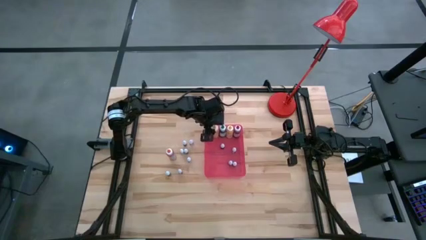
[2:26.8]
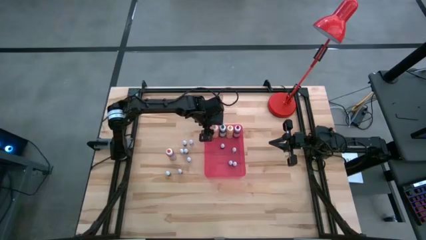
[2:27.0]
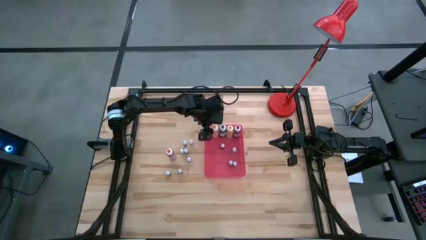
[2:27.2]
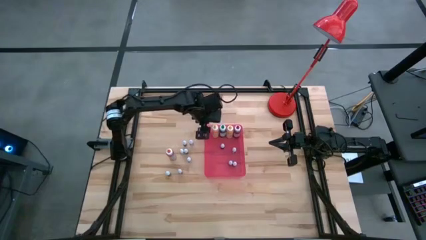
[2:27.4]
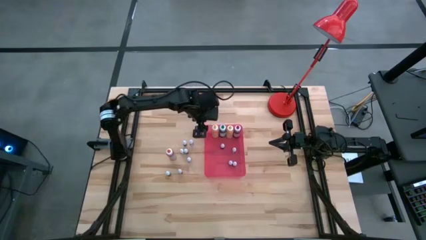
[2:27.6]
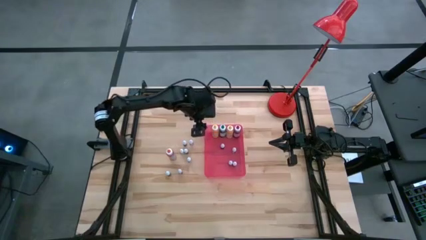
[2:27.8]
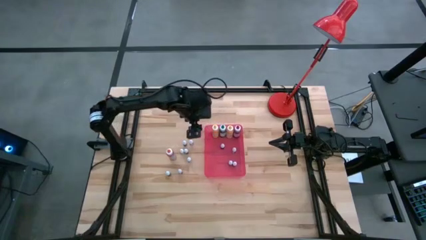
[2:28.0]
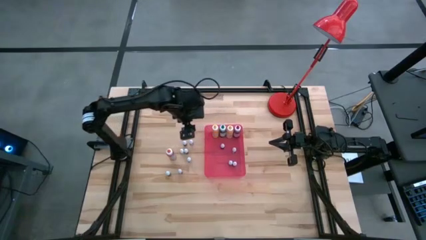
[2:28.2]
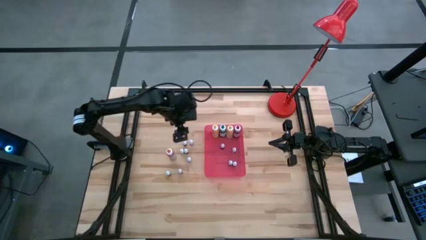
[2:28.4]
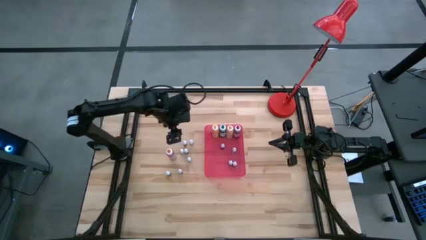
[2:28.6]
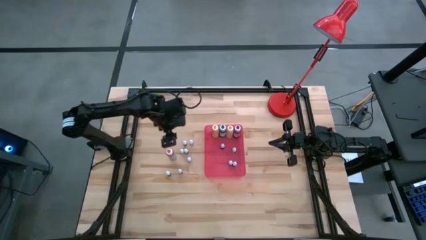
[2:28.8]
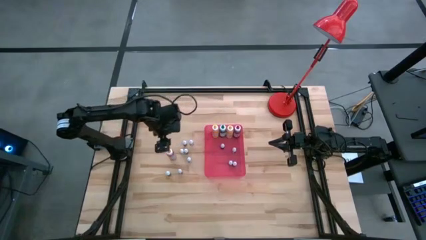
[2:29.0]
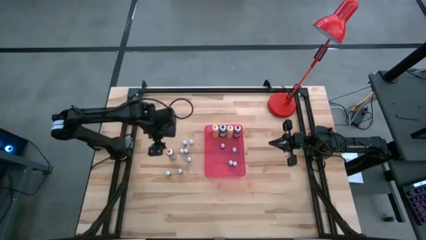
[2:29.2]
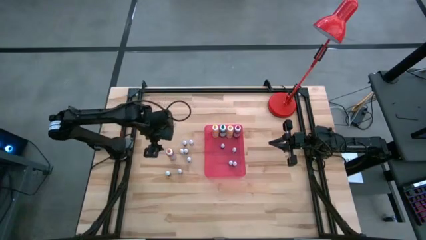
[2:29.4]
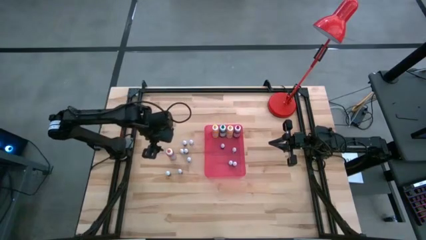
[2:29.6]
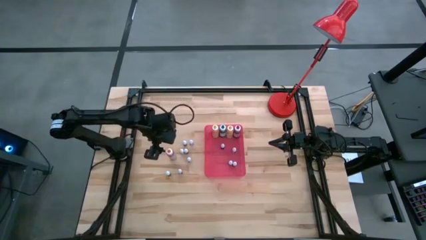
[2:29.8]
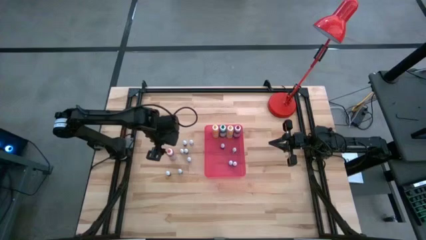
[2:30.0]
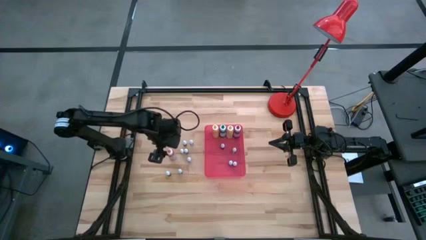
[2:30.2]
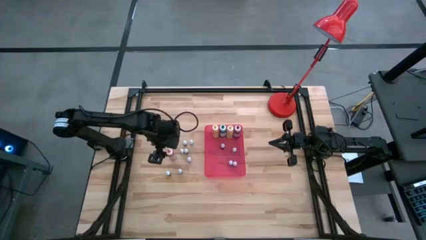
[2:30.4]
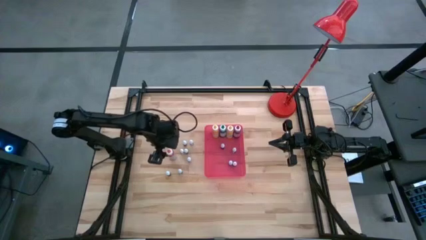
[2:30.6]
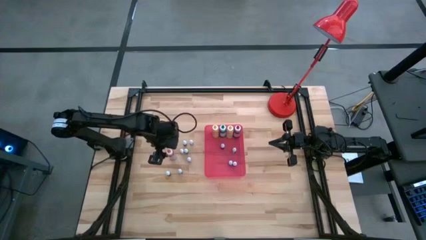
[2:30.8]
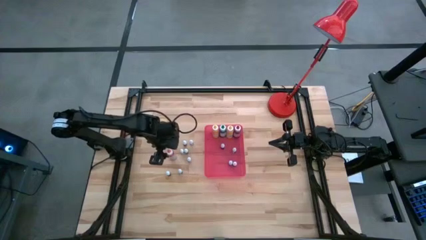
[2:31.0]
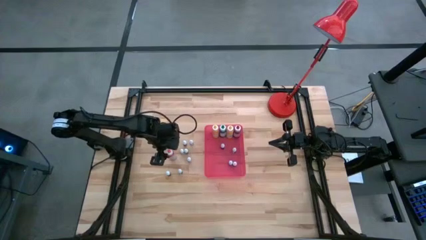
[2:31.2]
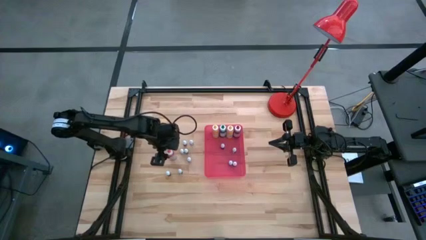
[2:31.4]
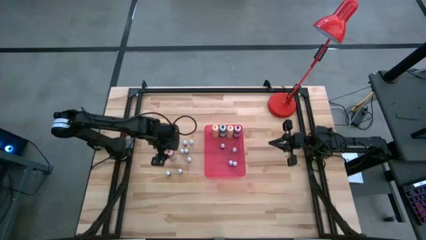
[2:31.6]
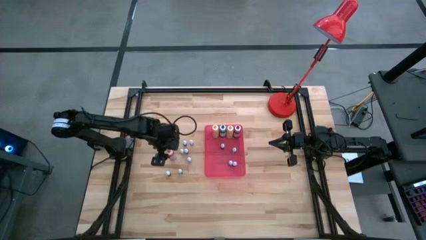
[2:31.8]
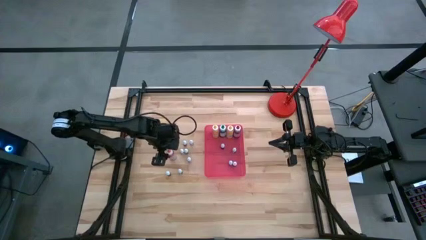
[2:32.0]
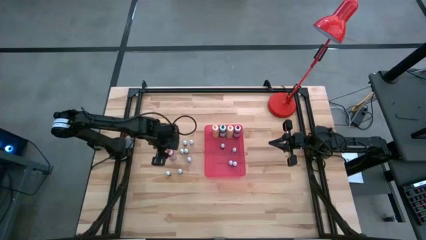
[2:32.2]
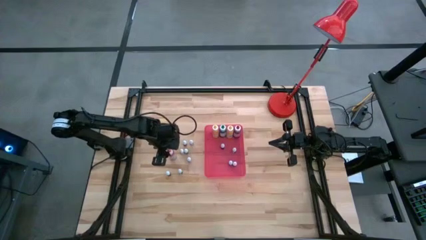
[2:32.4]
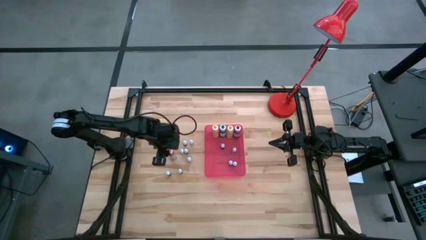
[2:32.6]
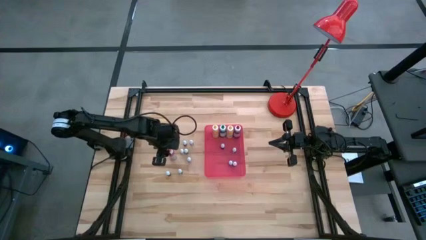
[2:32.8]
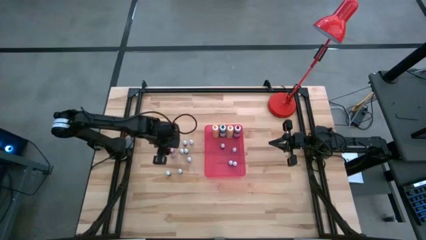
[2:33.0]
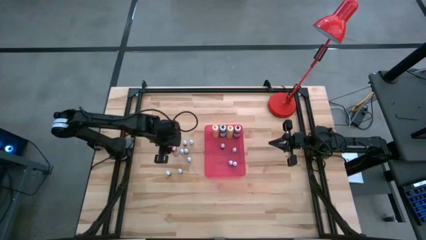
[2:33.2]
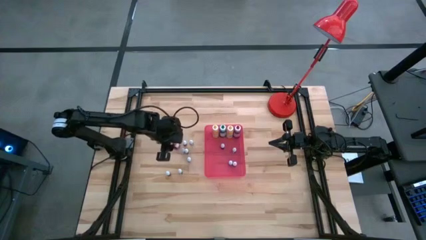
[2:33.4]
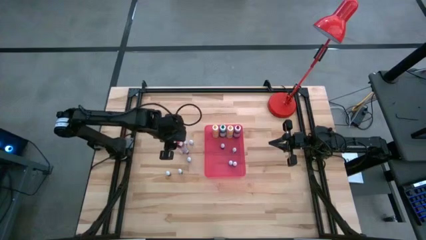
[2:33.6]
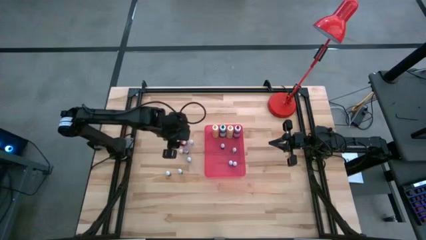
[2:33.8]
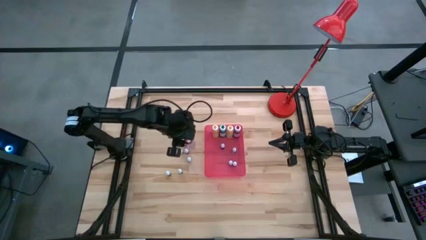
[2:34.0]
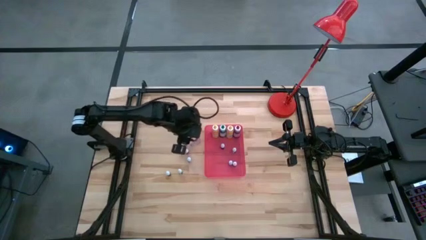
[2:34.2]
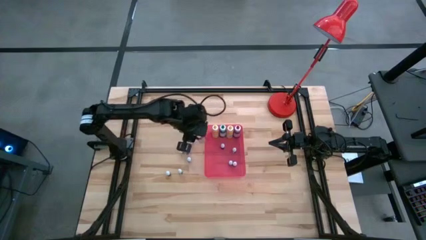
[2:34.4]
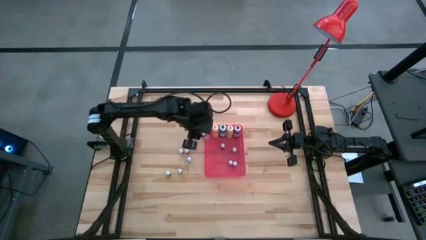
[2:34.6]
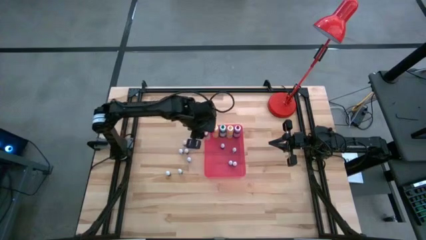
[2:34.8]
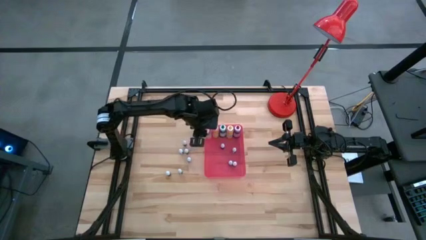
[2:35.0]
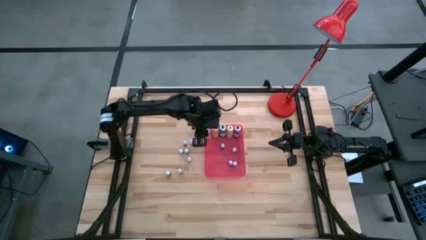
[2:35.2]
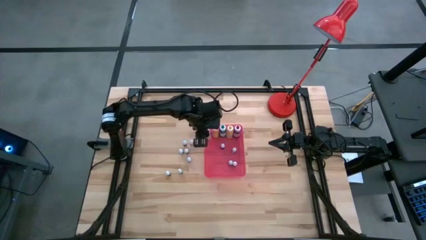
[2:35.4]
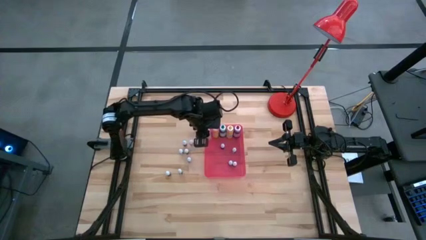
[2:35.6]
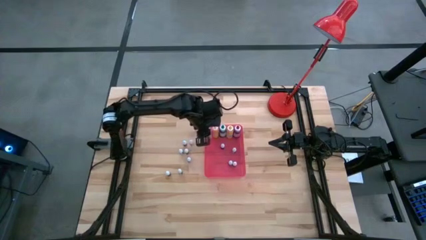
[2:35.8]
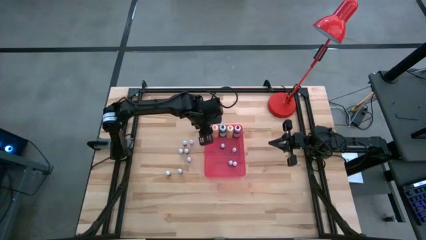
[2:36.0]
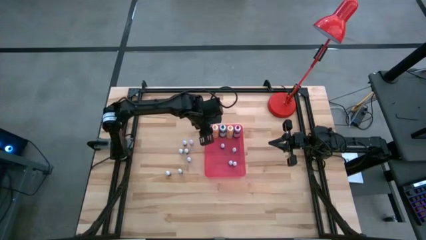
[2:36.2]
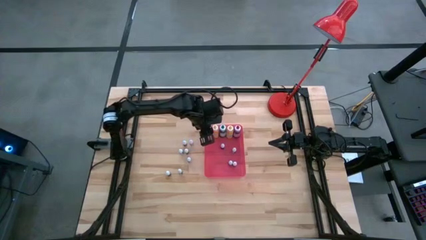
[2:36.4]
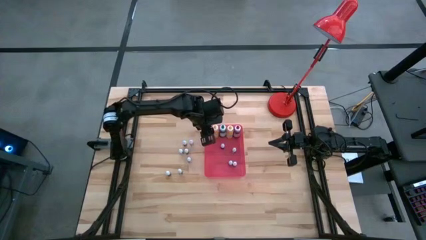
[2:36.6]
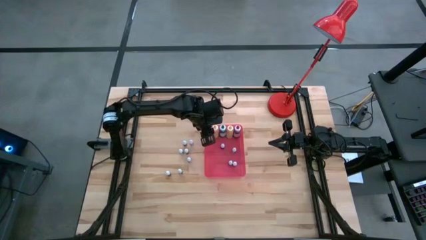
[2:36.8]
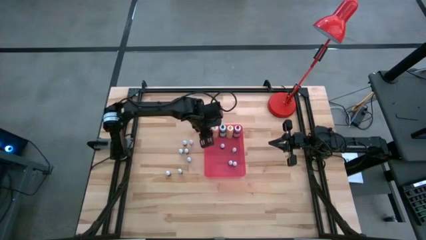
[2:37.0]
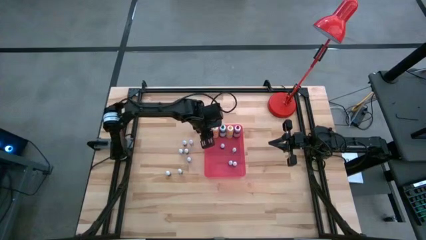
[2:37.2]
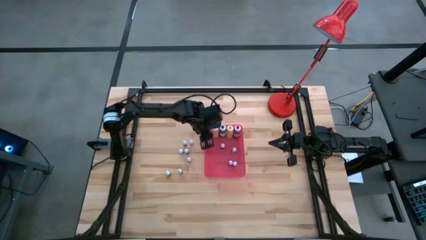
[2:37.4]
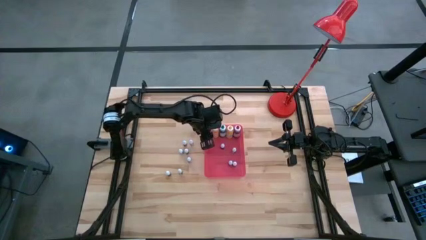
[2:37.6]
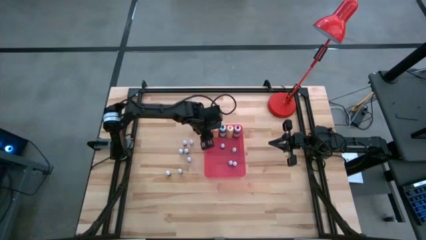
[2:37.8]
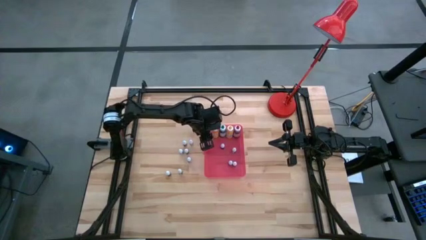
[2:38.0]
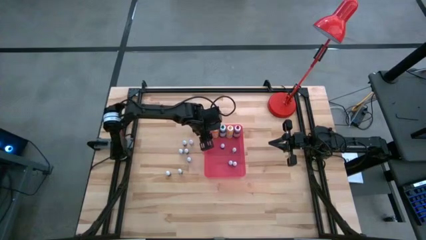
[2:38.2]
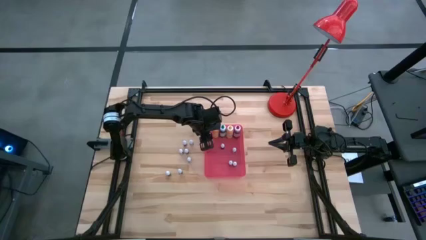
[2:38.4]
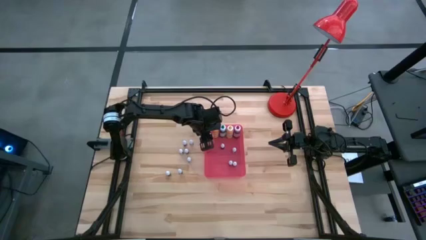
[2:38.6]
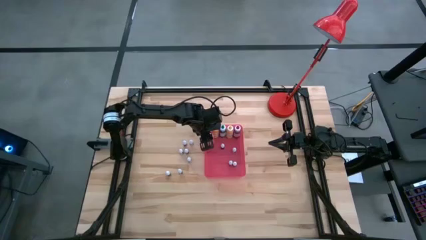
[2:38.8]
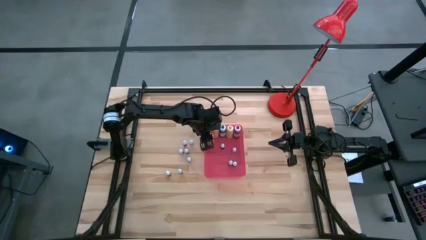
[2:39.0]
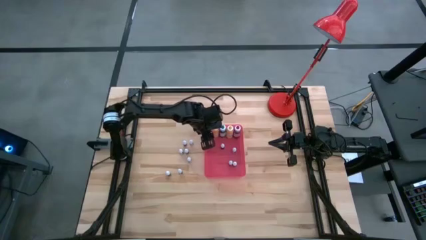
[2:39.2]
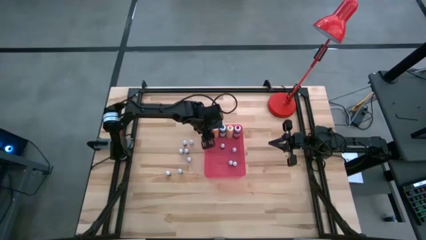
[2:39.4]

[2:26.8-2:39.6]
Task: Pick & Place food coloring
Put the large orange food coloring bottle into the red bin

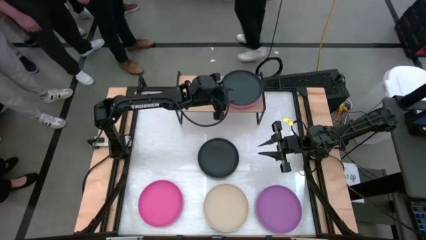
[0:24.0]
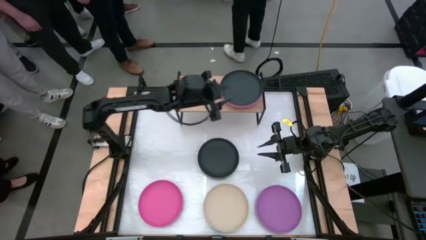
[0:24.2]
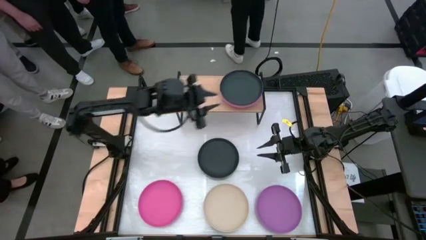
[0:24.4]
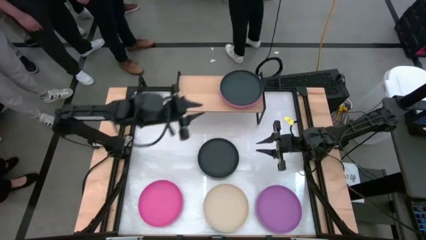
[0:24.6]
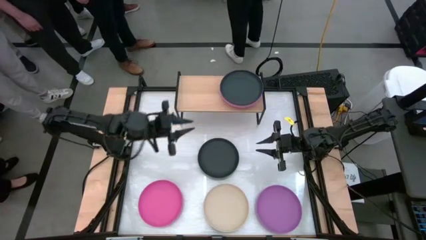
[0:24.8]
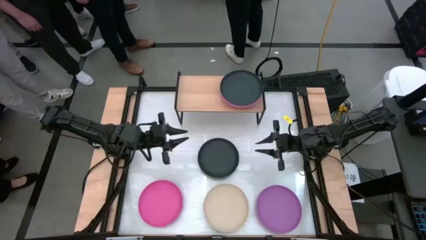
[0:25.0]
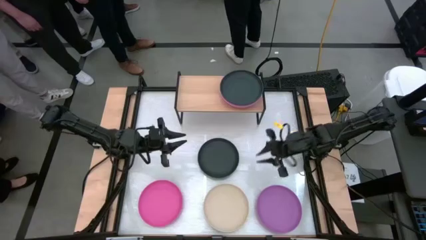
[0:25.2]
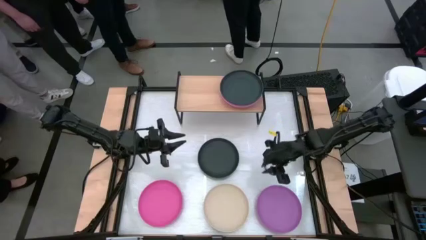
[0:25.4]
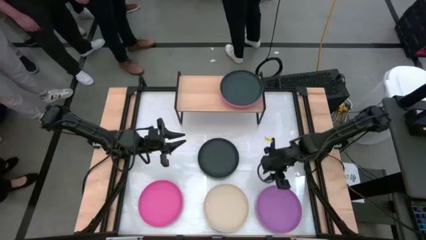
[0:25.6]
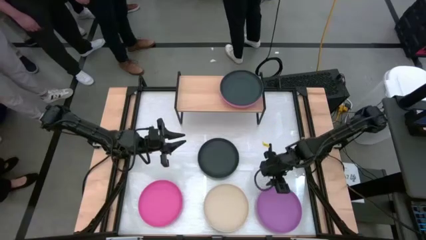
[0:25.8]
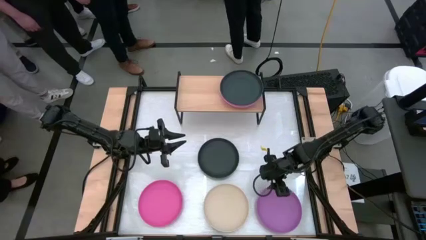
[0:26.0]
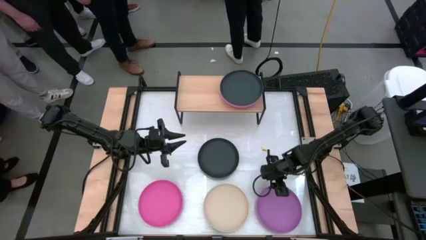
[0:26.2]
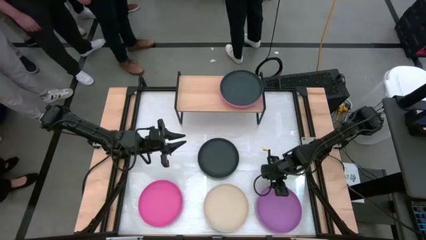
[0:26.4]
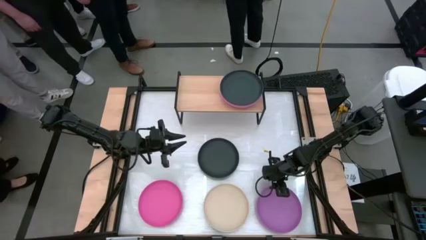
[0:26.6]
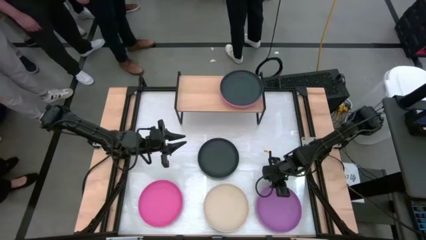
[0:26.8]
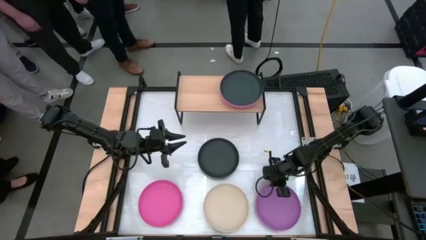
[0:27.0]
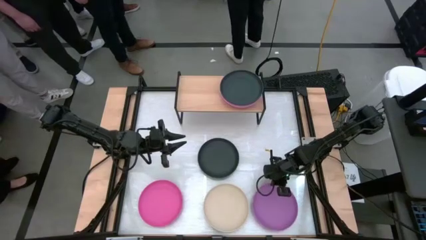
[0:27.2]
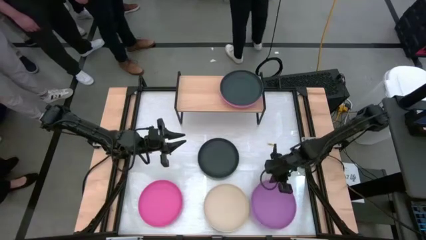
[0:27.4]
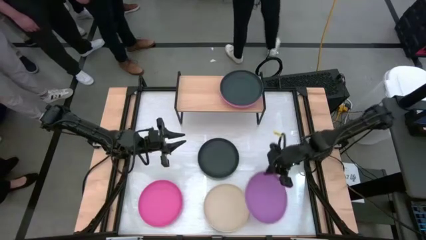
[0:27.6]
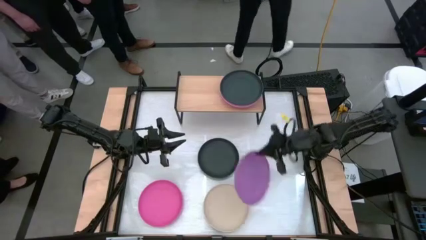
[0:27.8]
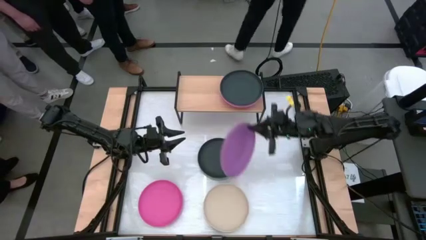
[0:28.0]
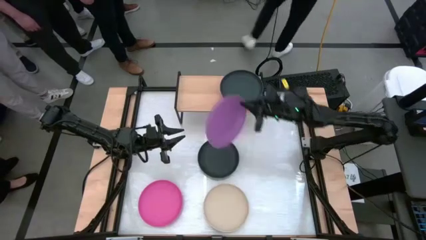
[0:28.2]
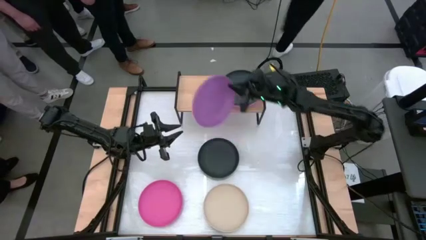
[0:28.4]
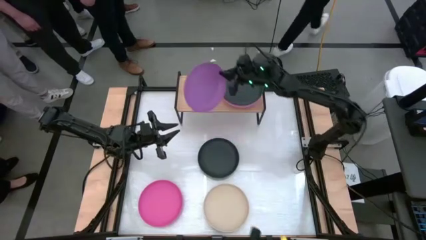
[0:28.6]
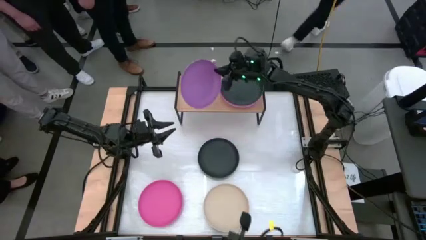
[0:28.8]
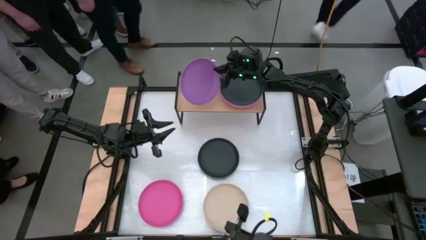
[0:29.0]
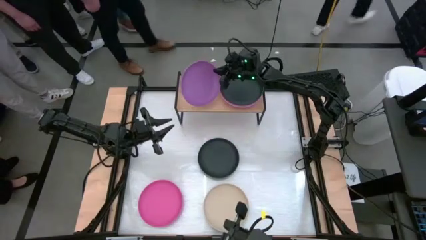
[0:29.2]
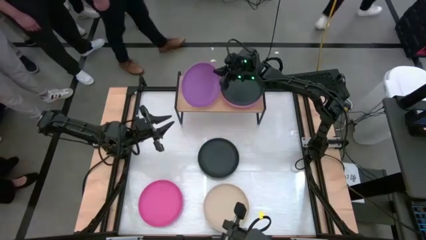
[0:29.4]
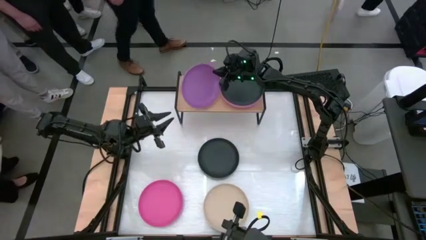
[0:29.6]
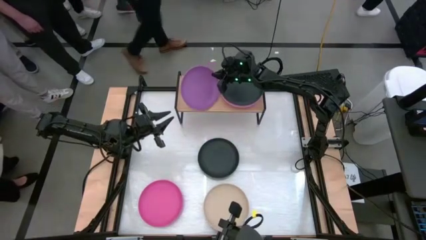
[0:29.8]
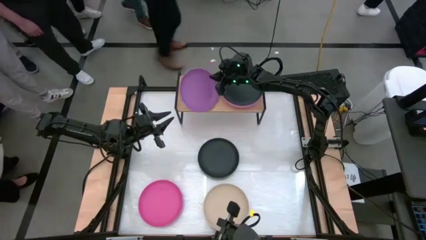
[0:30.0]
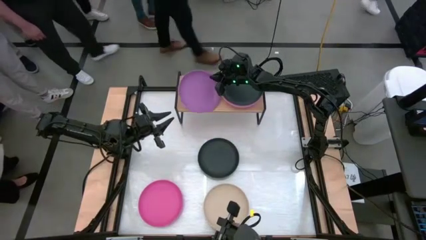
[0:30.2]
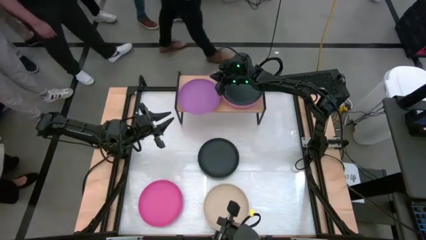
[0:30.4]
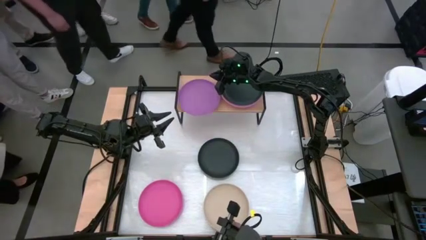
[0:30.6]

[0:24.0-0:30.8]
Task: Place and stack plates onto a shelf
Put the purple plate on the shelf
